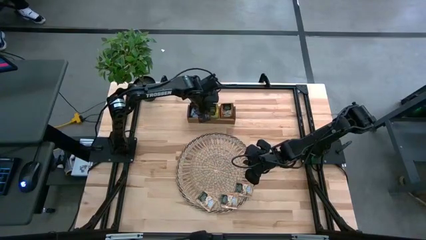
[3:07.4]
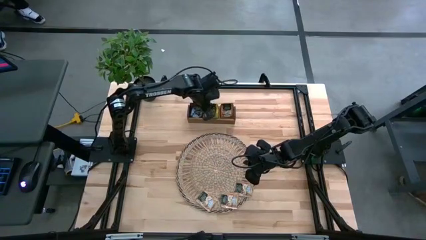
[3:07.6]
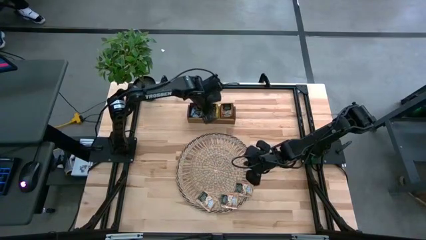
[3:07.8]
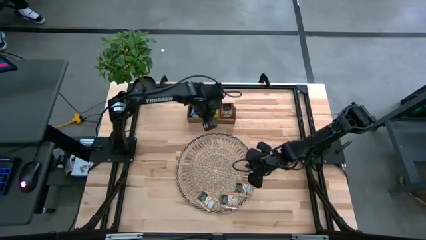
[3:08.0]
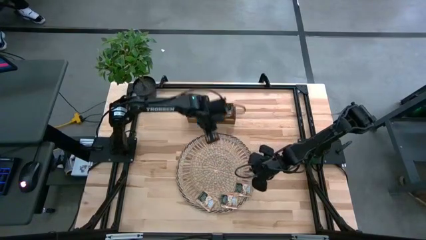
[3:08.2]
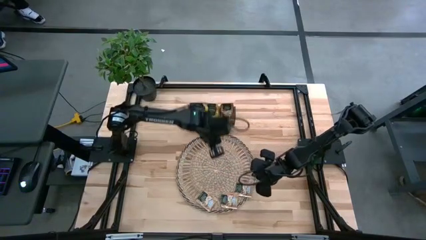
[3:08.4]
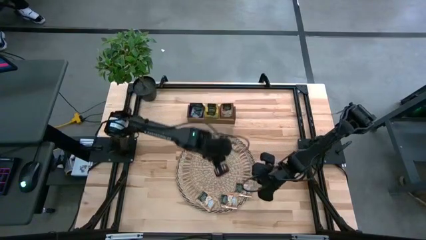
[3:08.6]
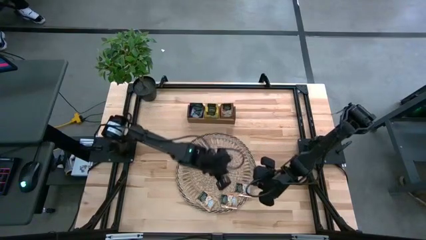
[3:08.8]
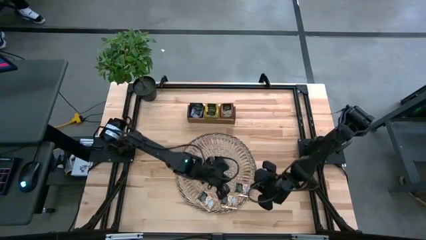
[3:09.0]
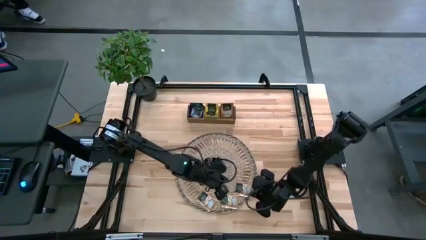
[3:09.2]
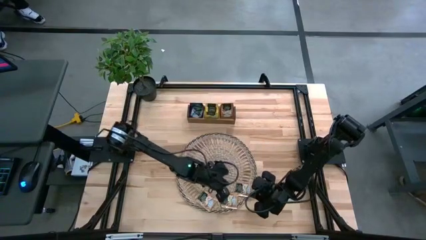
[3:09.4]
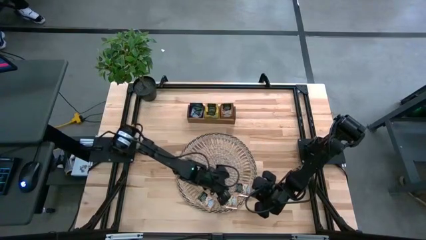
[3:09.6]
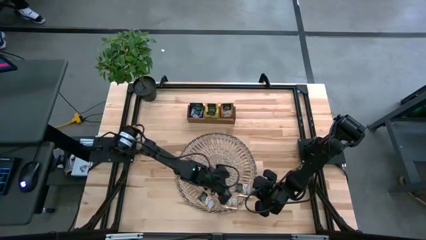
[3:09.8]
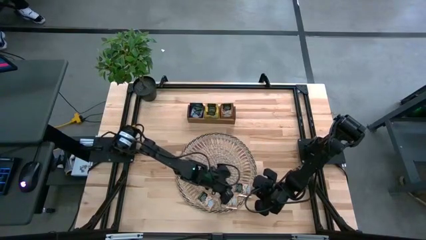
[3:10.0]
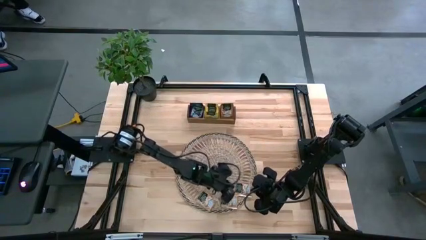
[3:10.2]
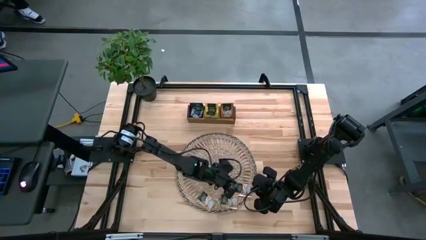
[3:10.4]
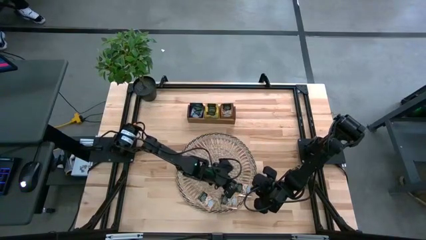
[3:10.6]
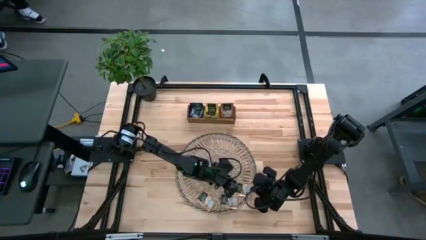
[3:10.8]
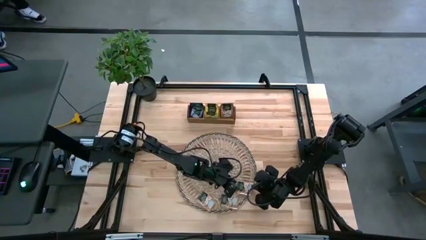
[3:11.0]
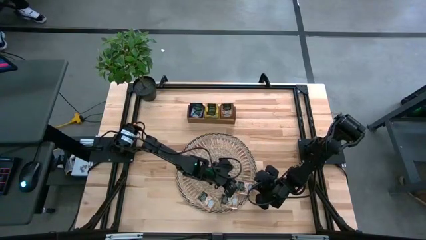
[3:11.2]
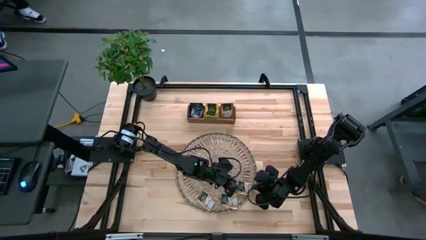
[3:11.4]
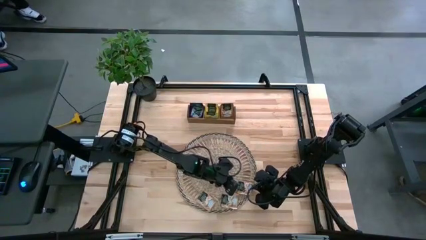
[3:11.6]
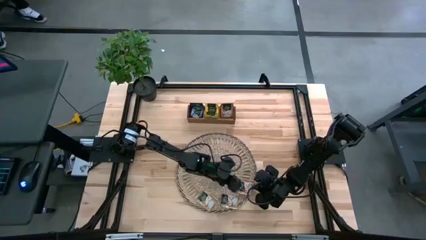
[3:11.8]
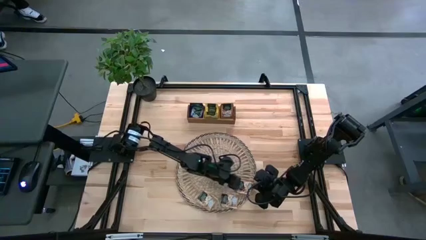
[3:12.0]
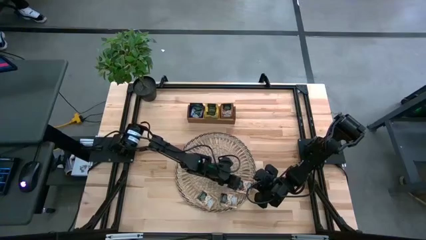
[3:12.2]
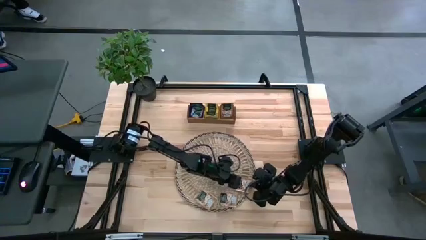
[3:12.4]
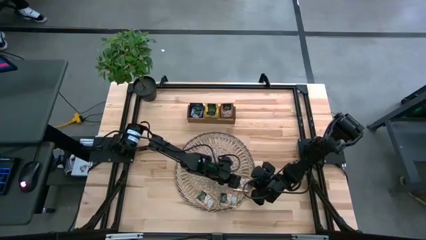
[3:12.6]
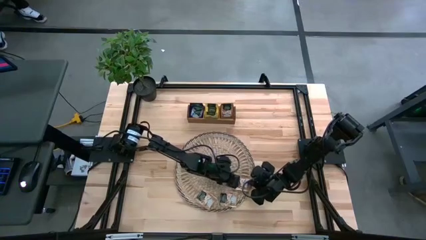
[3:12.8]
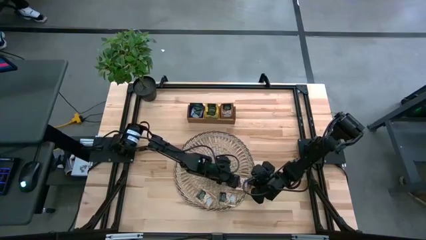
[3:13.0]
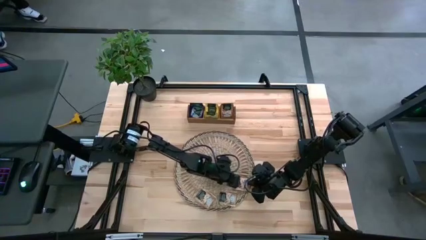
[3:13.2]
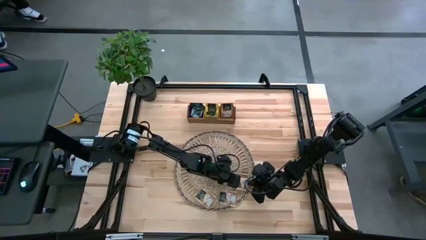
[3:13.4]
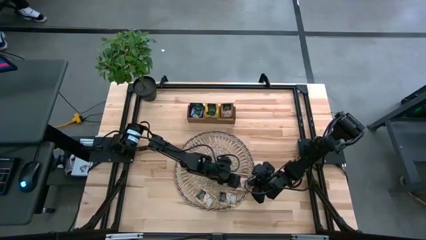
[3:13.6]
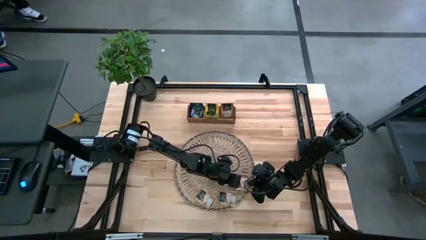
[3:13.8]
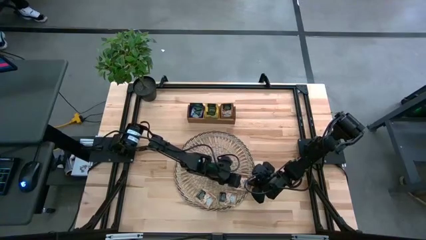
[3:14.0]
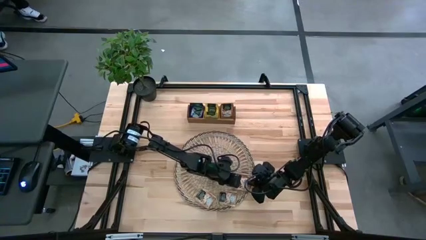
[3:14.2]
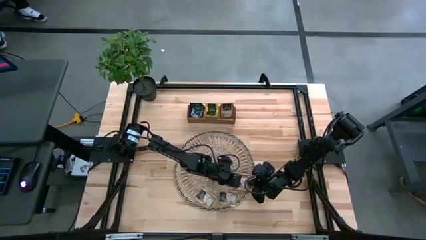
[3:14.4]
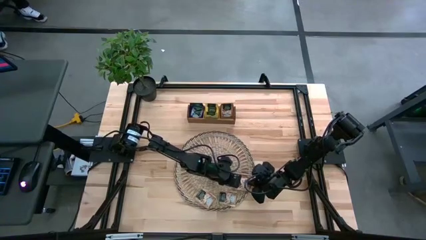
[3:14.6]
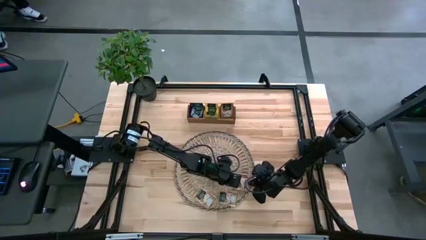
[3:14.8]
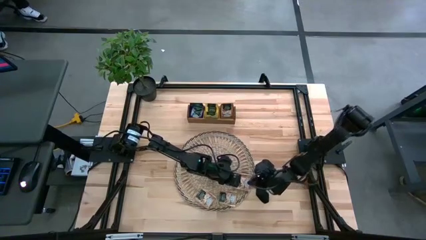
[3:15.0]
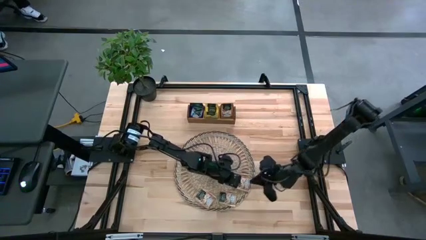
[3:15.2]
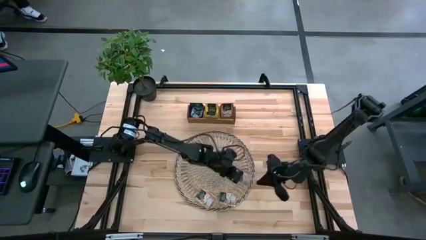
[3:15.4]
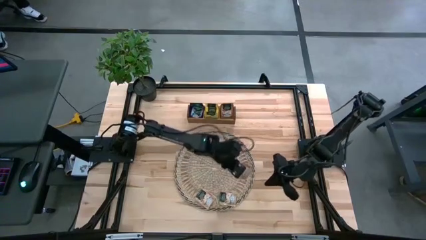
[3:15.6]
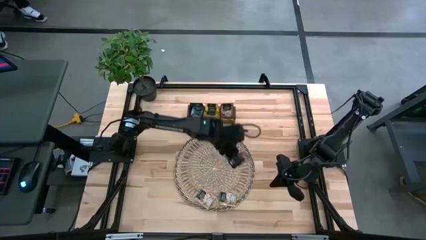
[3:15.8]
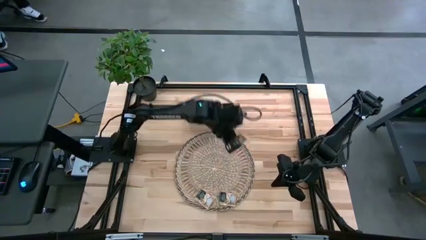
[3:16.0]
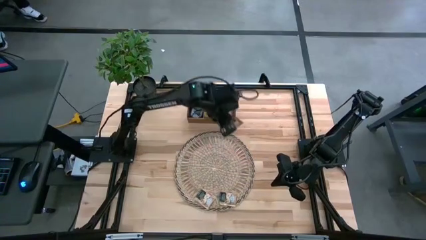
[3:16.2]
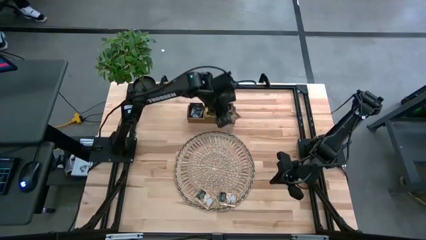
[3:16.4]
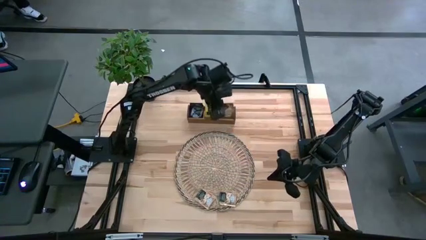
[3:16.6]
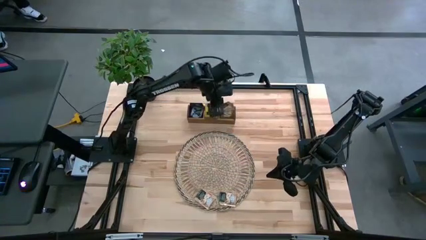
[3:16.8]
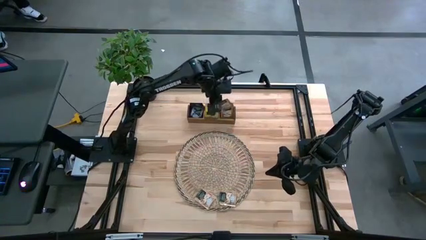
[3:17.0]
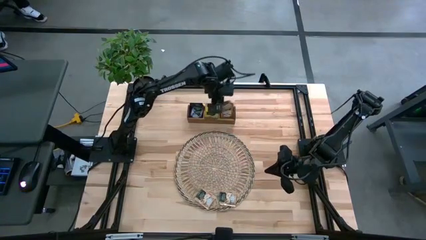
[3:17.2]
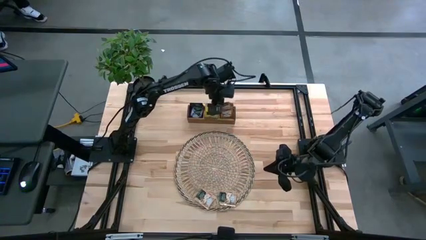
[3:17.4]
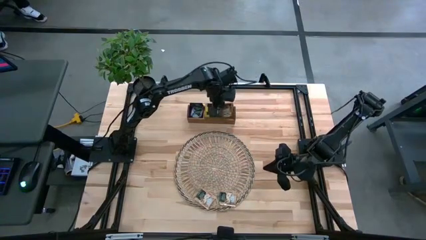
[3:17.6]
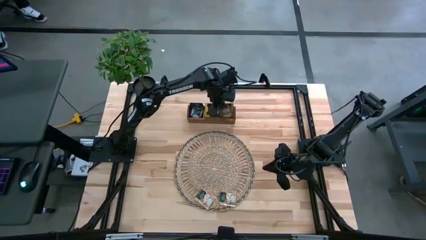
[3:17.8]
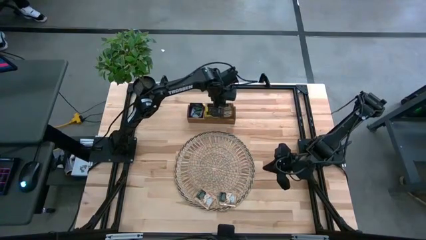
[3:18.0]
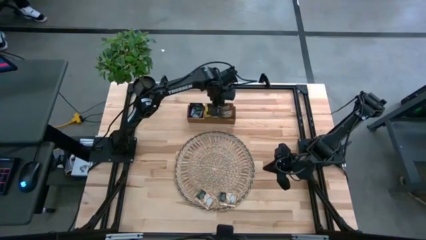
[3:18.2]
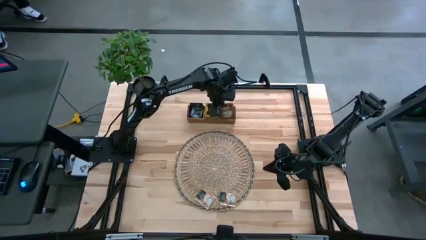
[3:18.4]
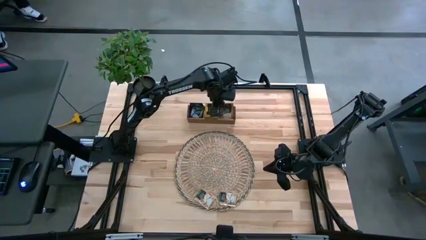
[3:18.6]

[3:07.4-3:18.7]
Task: Pick & Place Tea
Put the brown tea bag in the right section of the wooden organizer

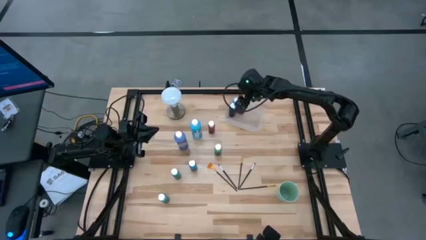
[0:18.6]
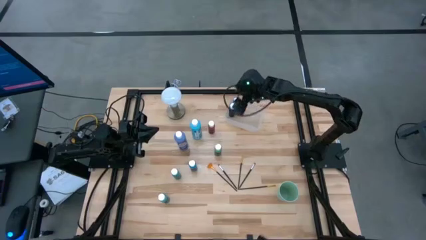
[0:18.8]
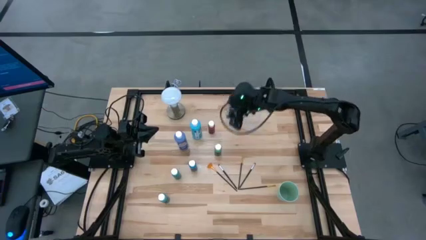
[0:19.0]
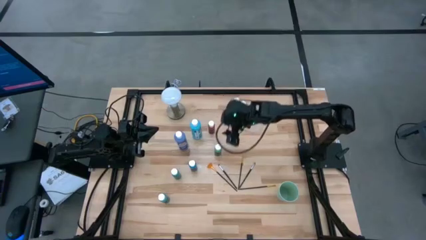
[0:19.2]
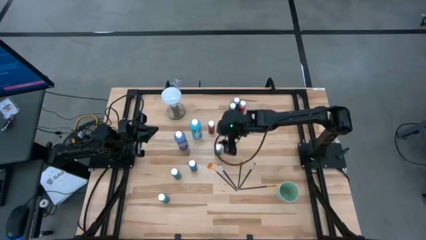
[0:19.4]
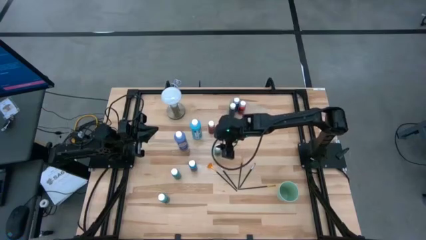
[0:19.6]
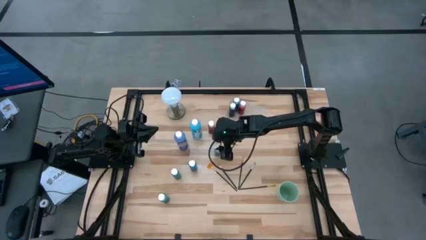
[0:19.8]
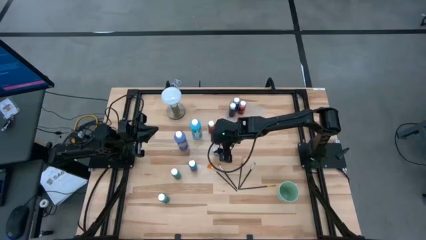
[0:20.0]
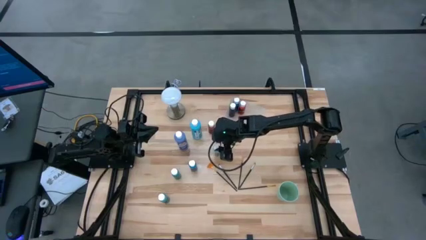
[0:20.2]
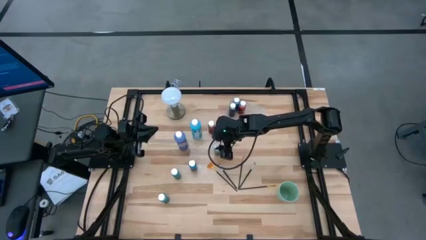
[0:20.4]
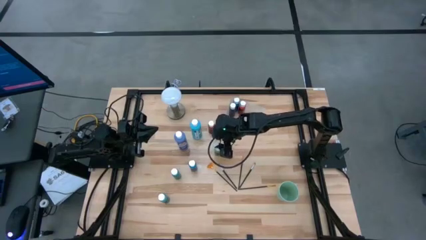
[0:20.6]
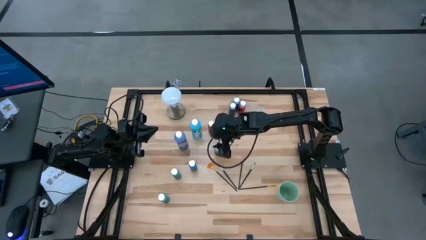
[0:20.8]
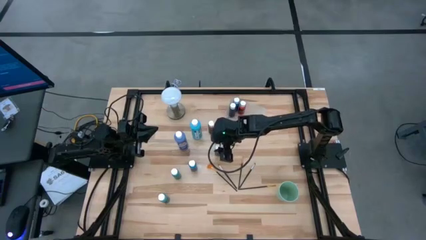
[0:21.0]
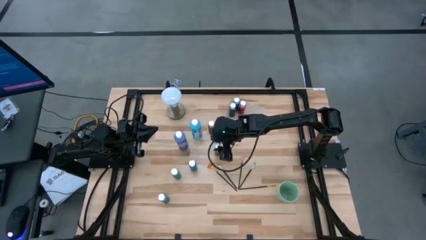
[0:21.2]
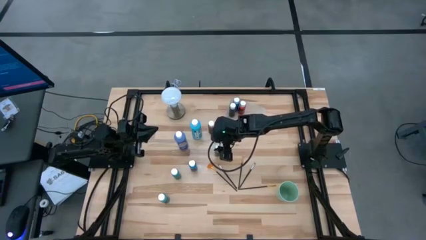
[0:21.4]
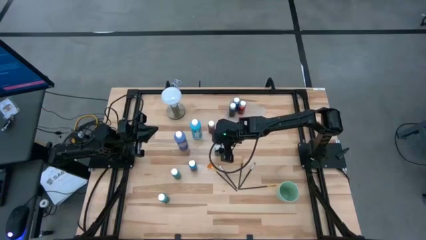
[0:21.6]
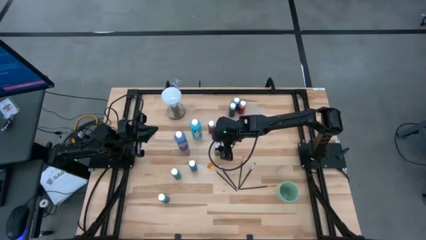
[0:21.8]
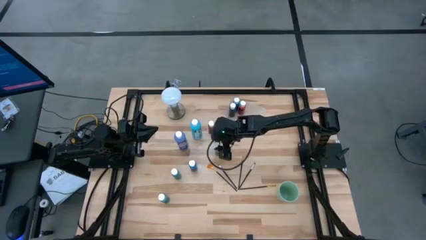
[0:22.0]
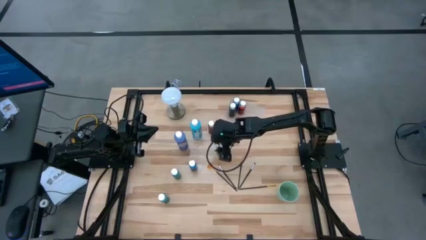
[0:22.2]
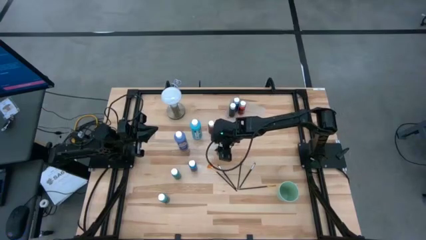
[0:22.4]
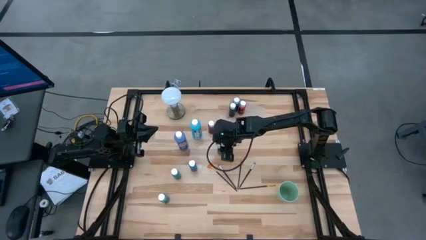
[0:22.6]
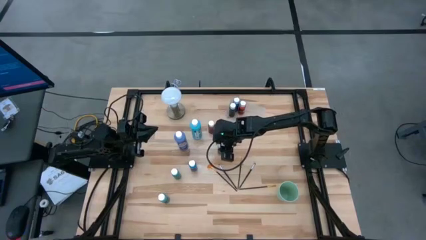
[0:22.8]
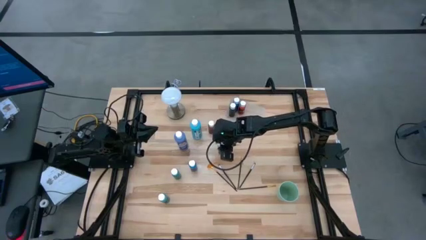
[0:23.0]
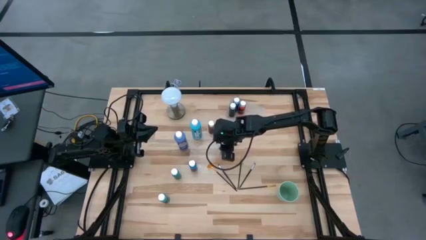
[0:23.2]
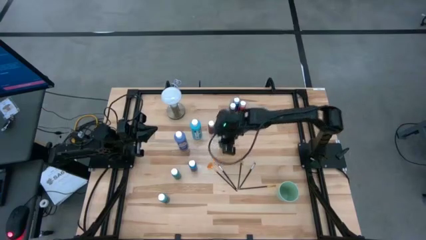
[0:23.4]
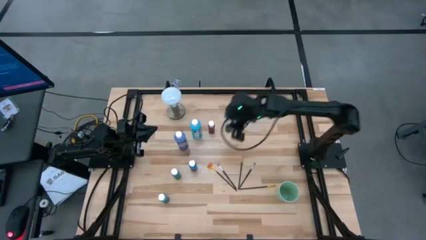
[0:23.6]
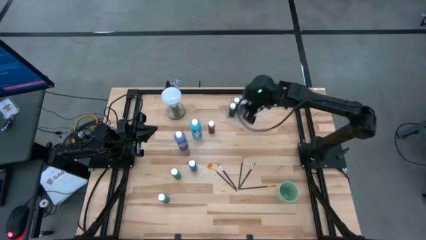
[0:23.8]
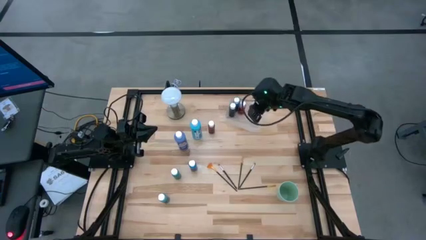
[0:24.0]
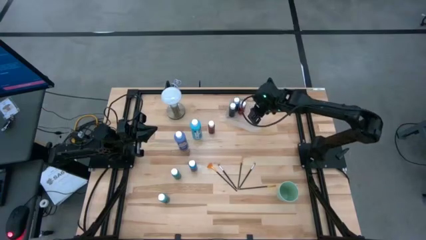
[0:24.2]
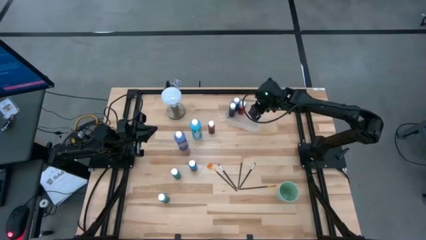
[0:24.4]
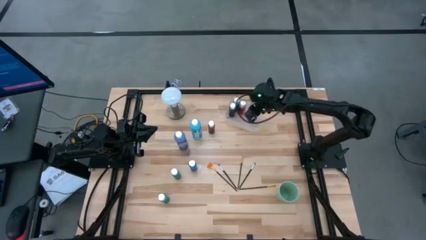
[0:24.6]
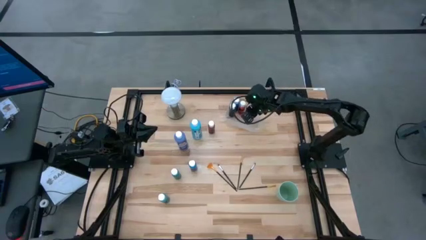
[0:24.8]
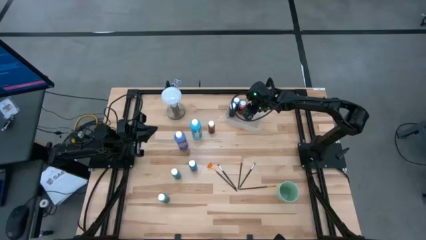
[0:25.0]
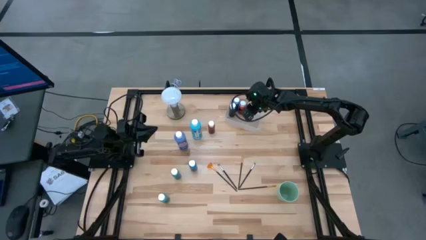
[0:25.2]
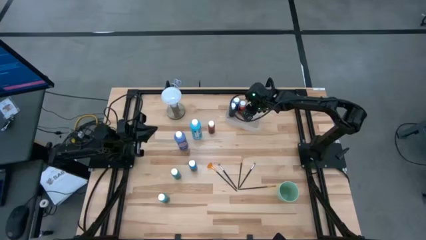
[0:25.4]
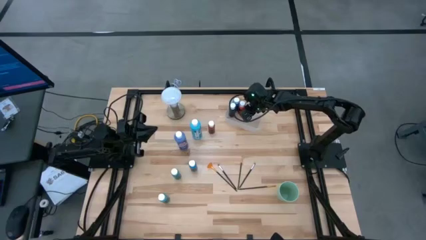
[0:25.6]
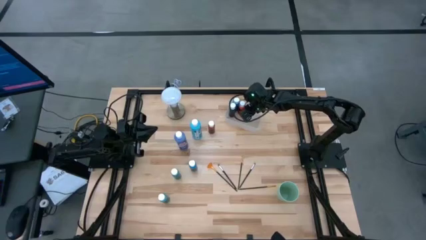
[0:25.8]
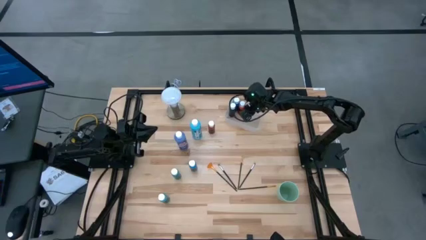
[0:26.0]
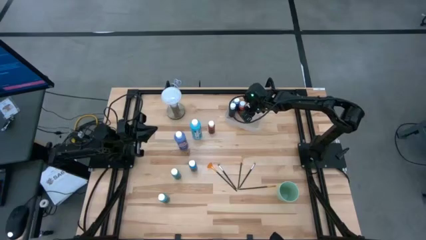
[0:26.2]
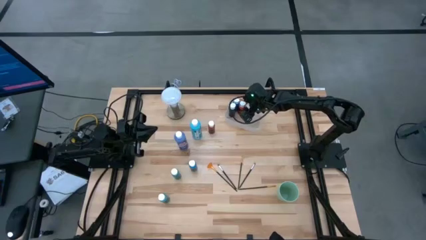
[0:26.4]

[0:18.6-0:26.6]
Task: Pick & Place Paint Supplies
Put the small green paint bottle into the transparent bin
